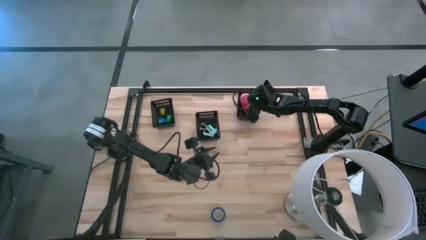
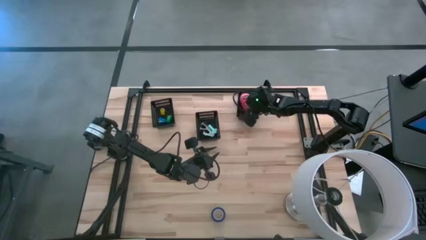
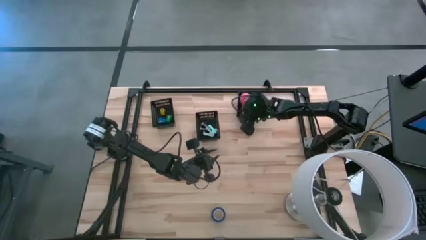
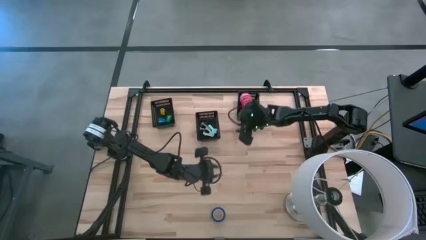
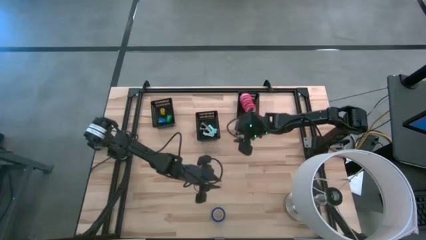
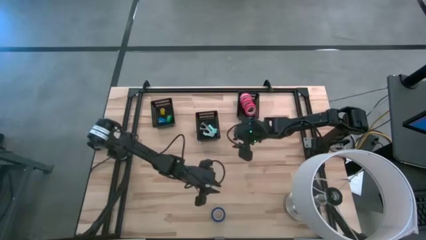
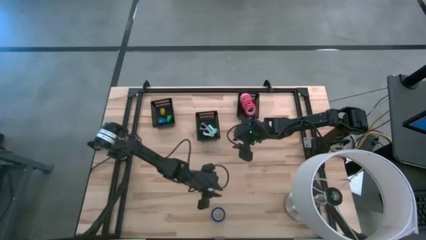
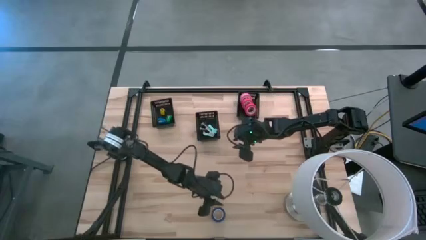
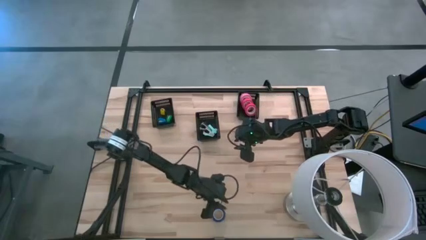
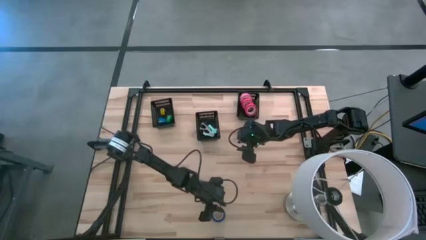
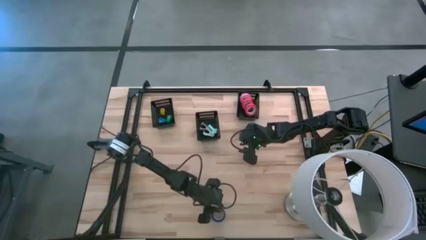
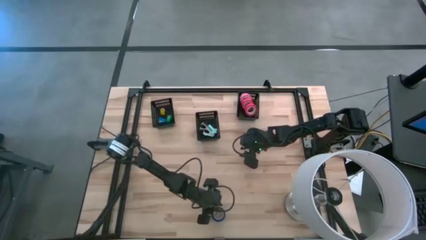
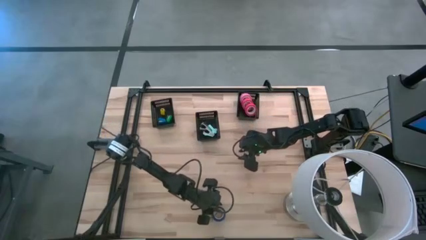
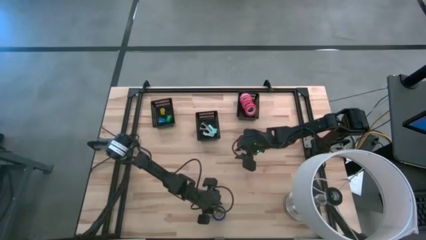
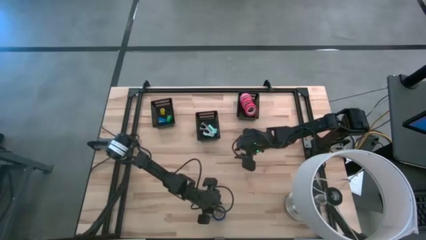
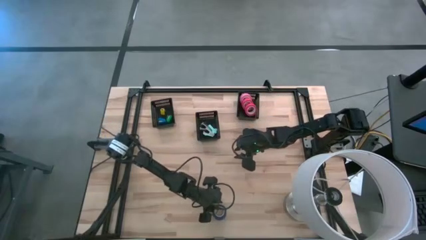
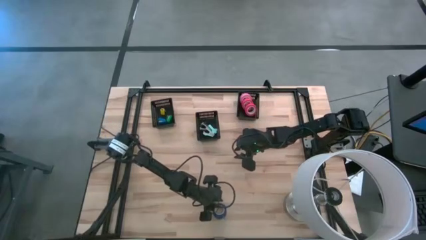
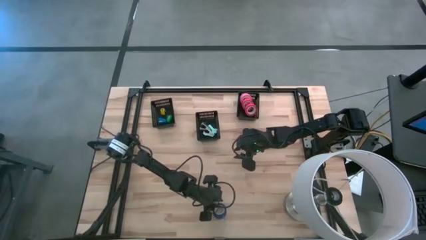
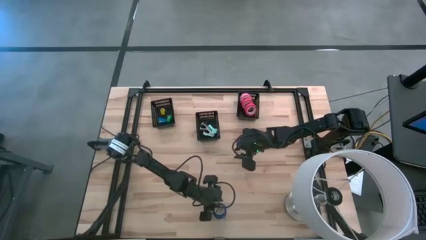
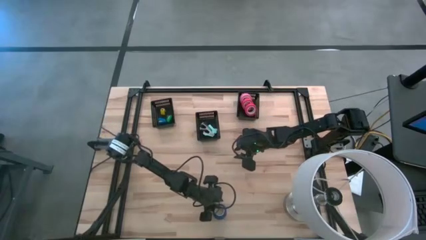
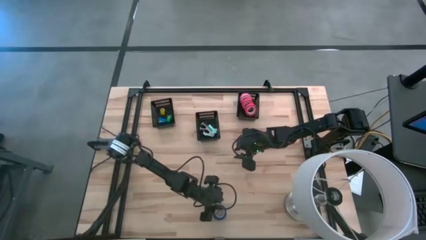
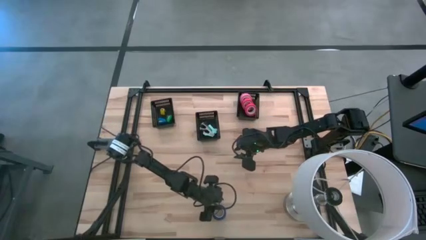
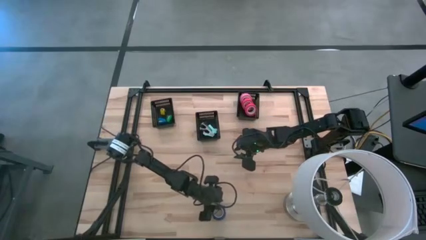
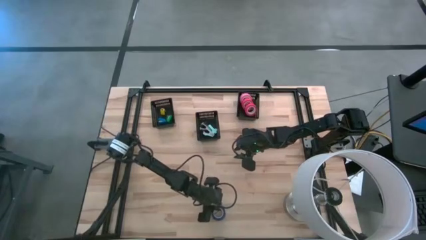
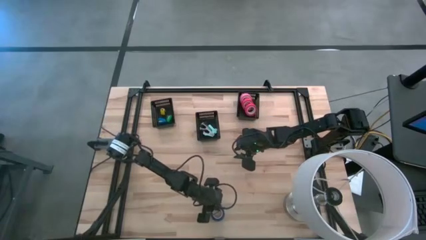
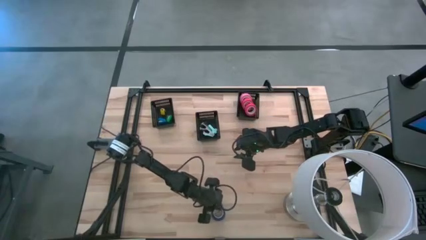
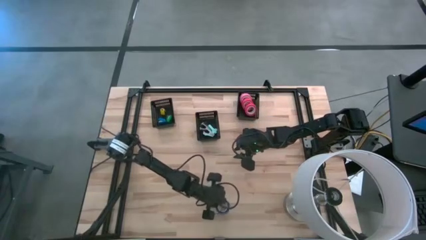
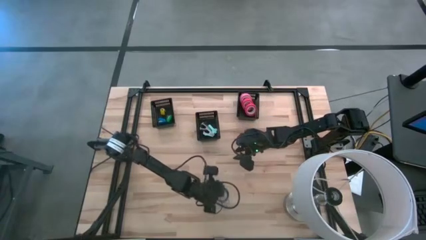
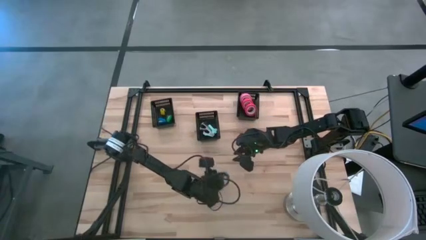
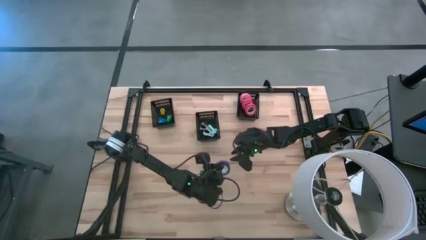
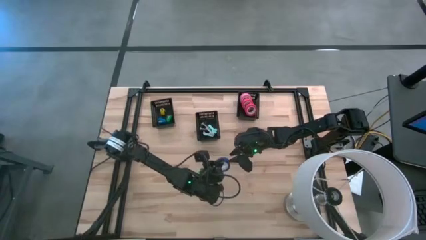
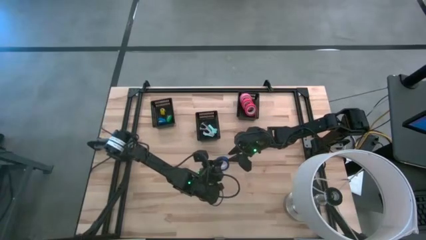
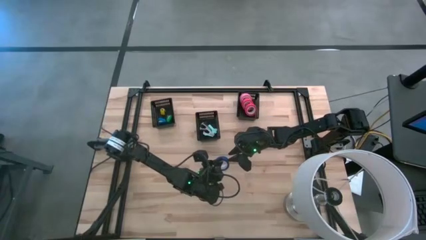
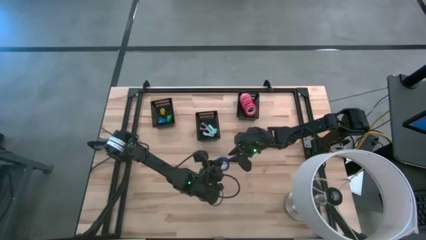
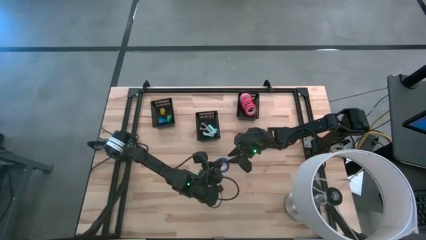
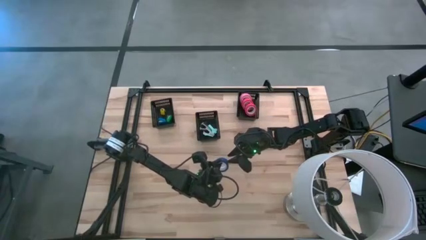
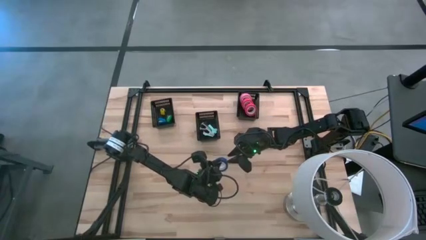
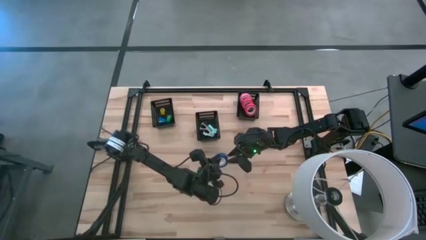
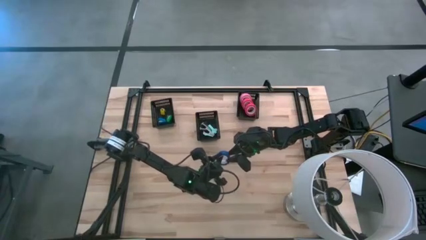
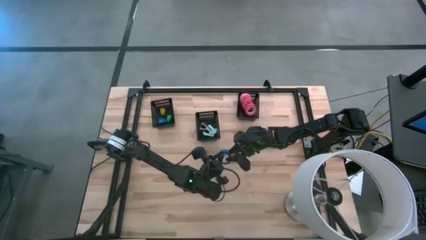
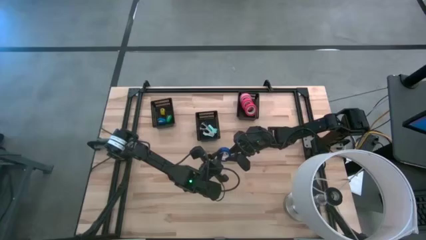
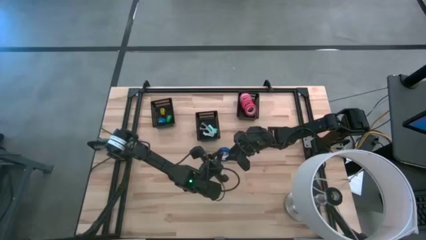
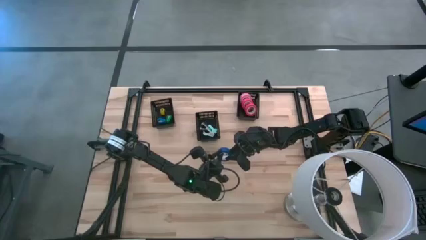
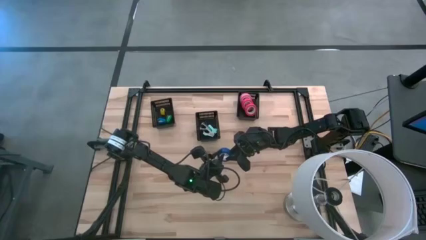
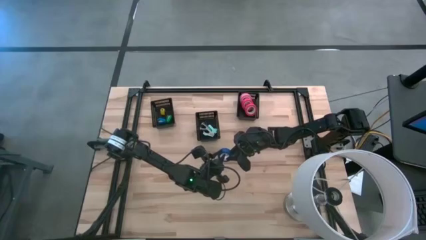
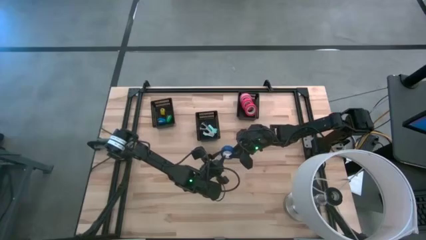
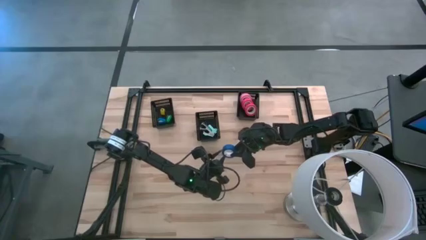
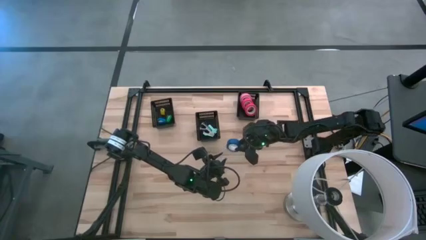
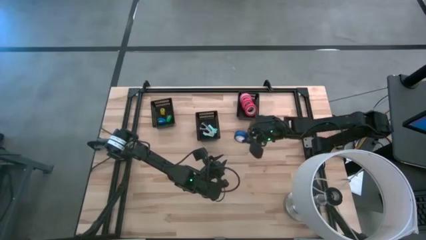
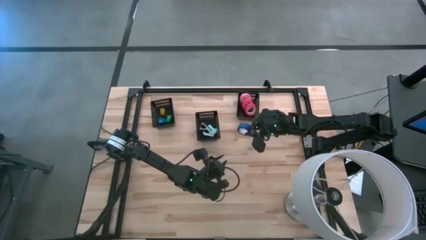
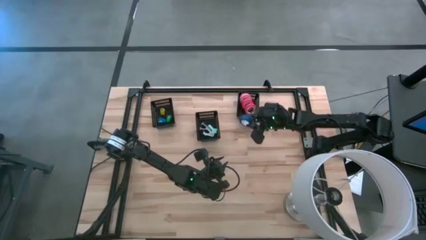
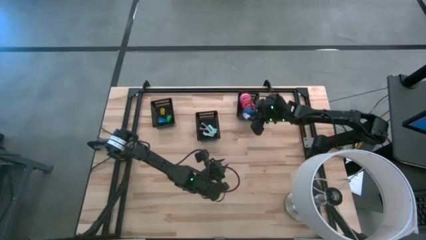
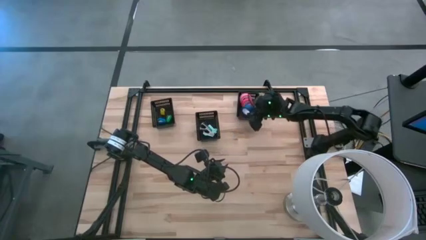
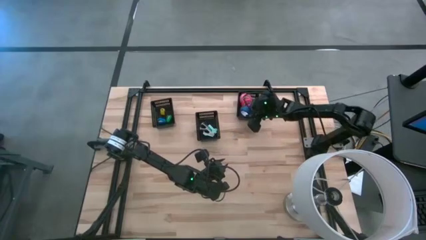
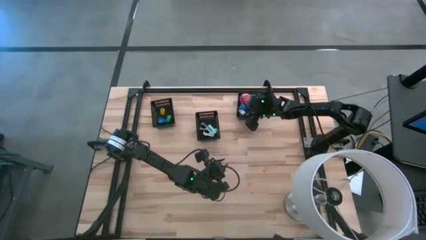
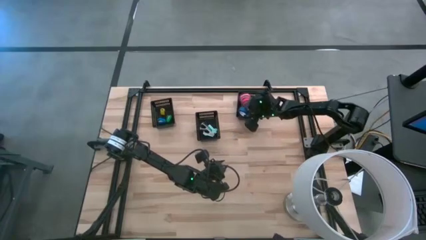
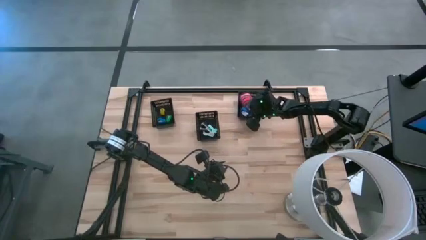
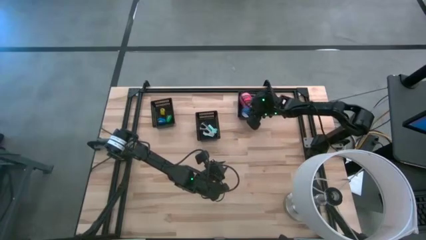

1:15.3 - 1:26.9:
Task: Pick and place Stapler, Stapler remover, tape
Put the blue tape into the right black bin

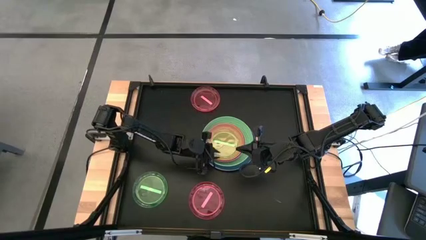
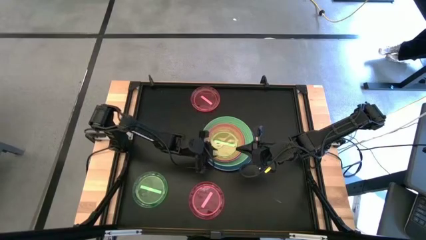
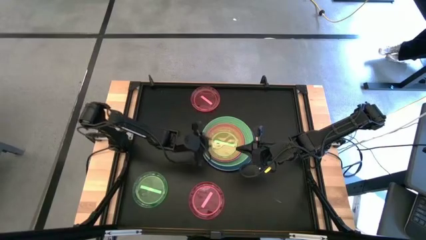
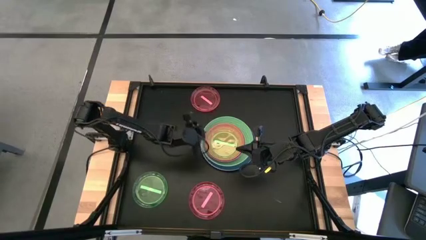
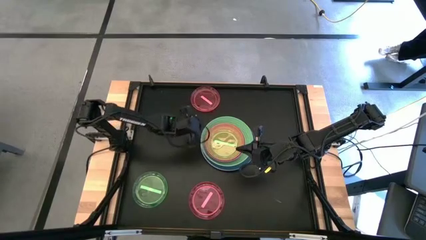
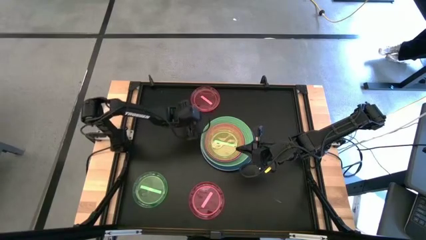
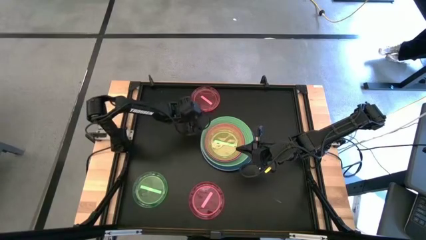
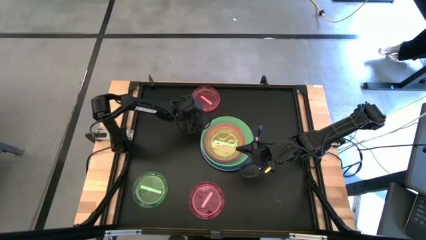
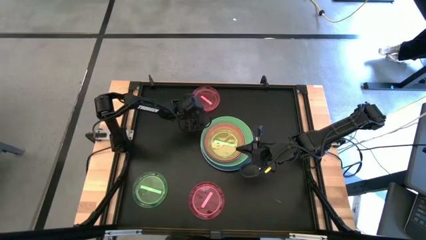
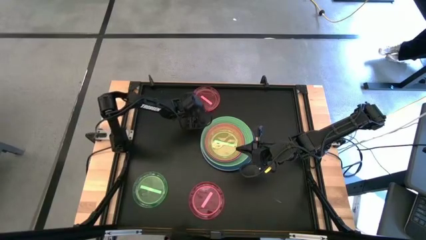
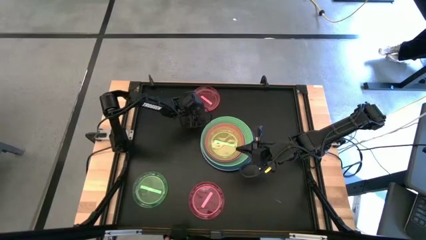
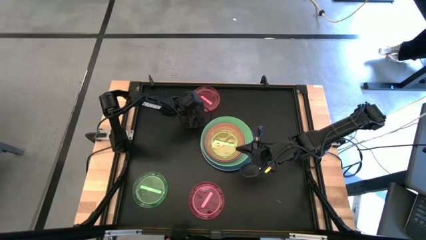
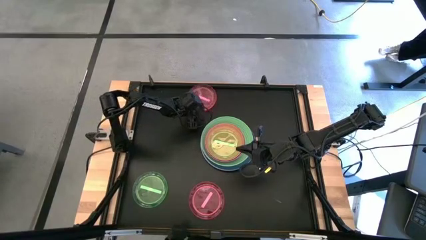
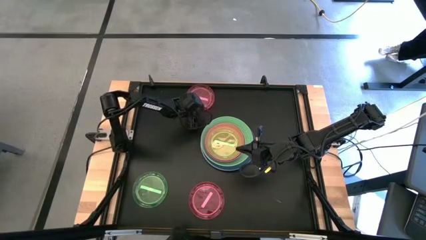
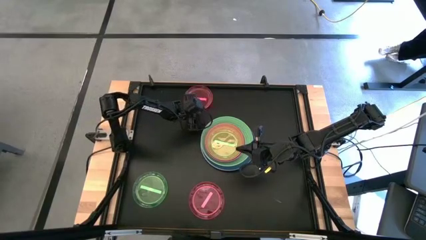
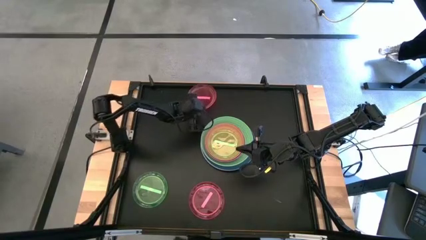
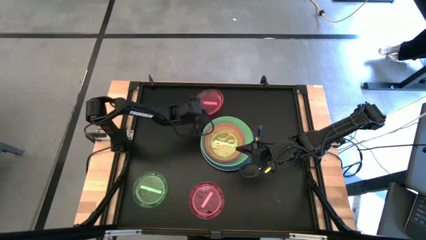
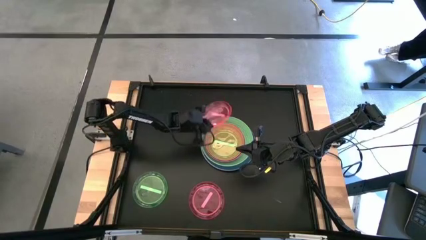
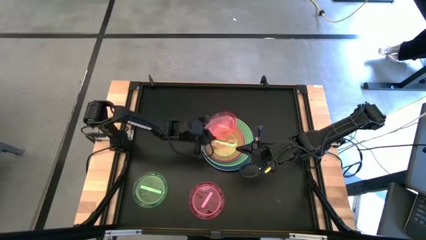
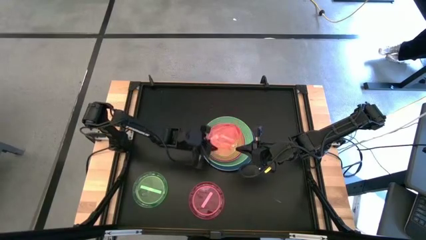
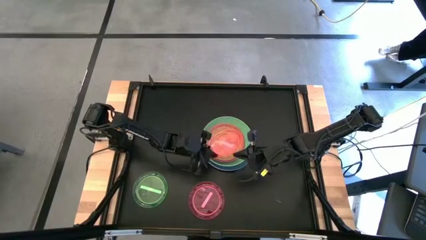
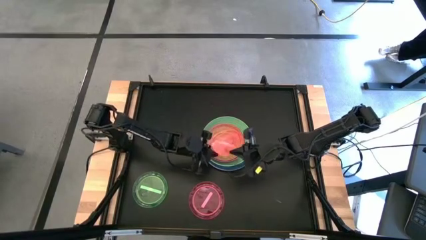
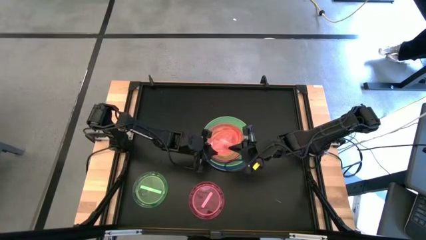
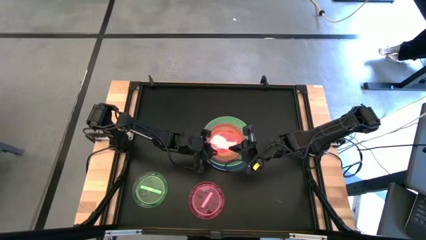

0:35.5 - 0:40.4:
Task: Stack plastic plates
Stack the top pink plate on top of the light green plate
